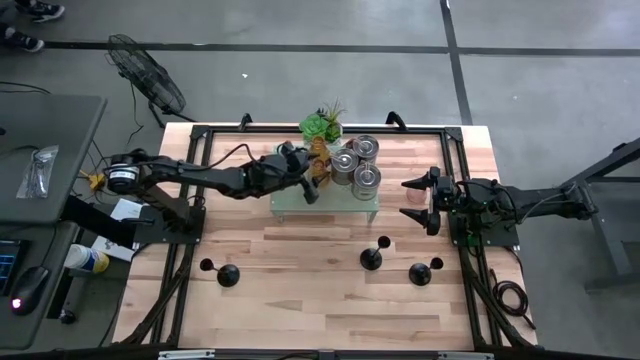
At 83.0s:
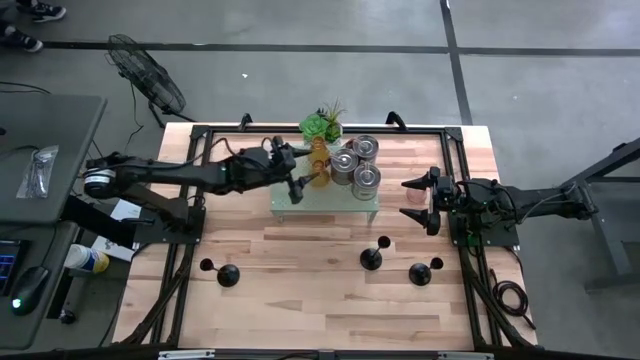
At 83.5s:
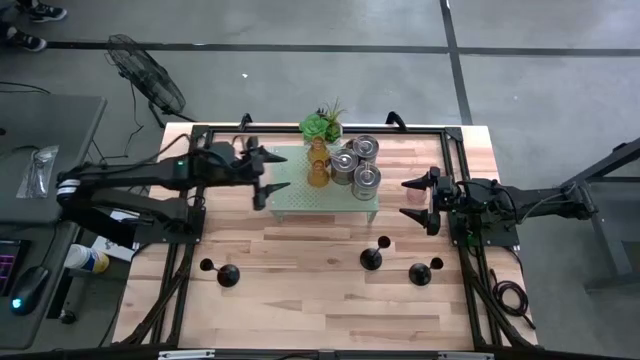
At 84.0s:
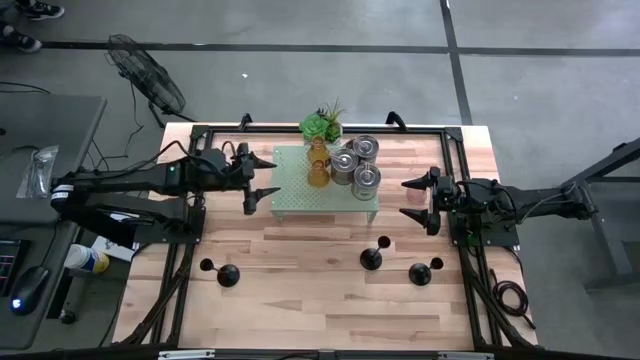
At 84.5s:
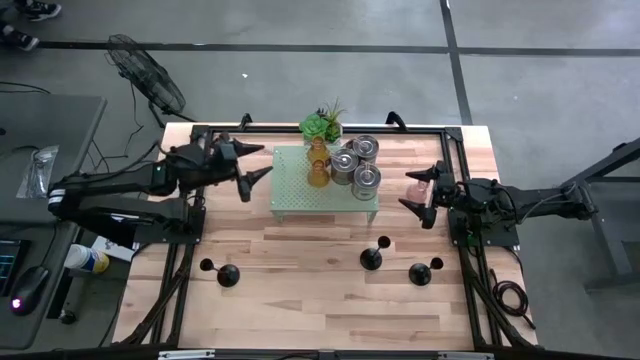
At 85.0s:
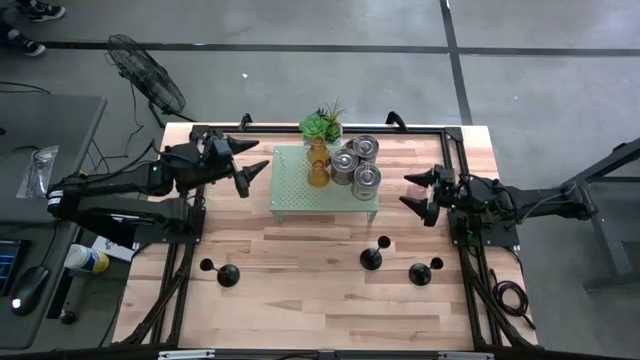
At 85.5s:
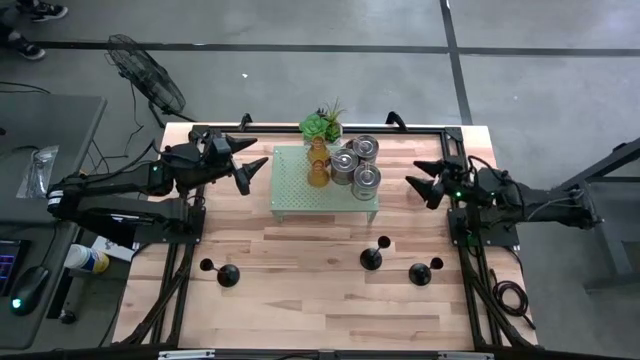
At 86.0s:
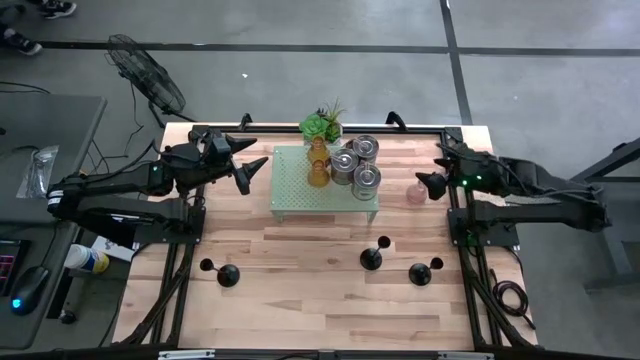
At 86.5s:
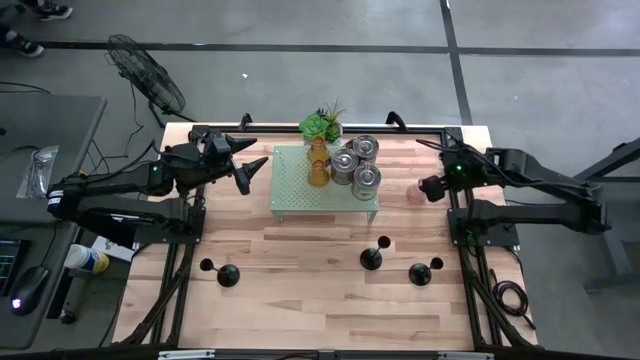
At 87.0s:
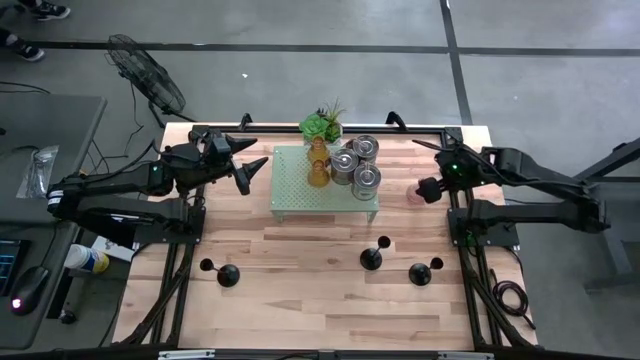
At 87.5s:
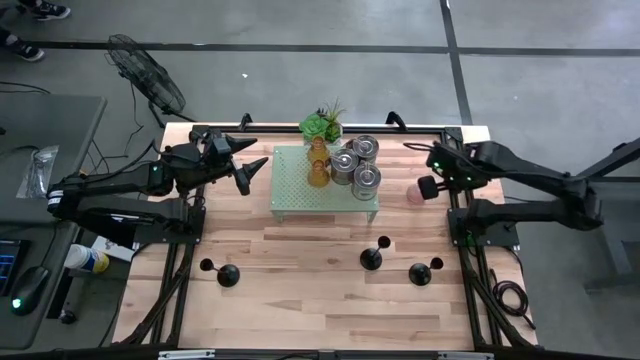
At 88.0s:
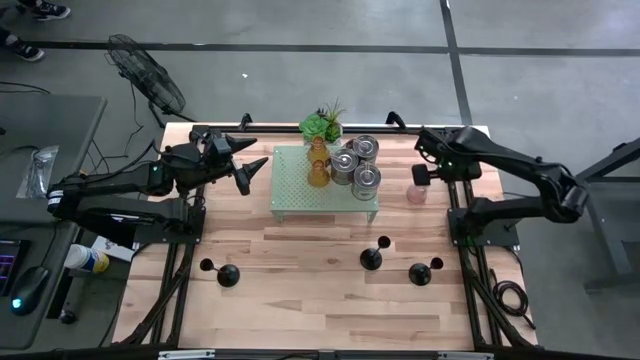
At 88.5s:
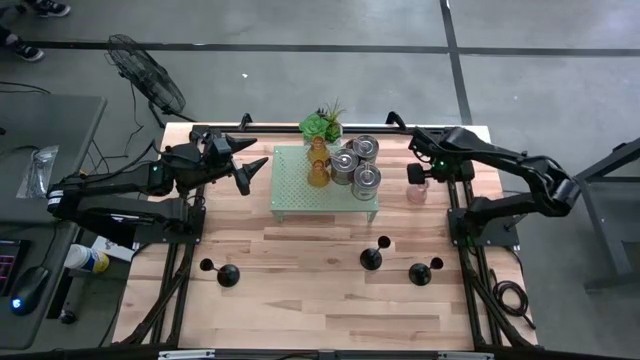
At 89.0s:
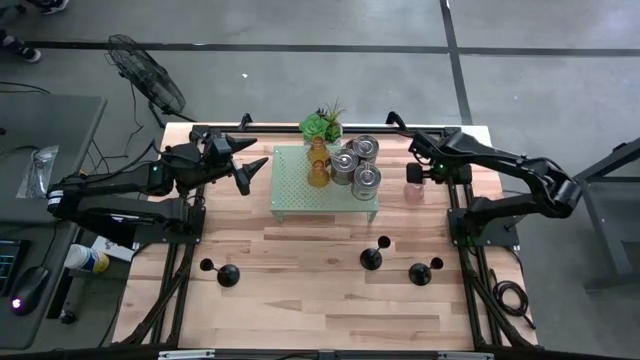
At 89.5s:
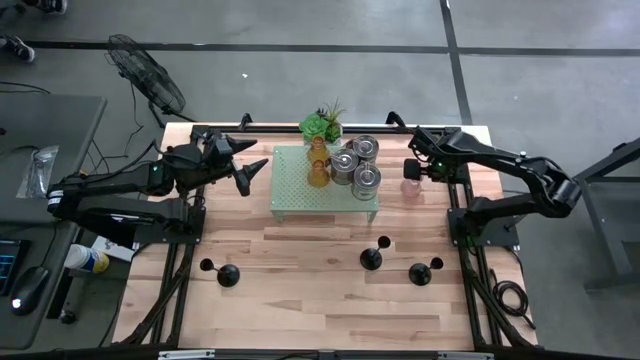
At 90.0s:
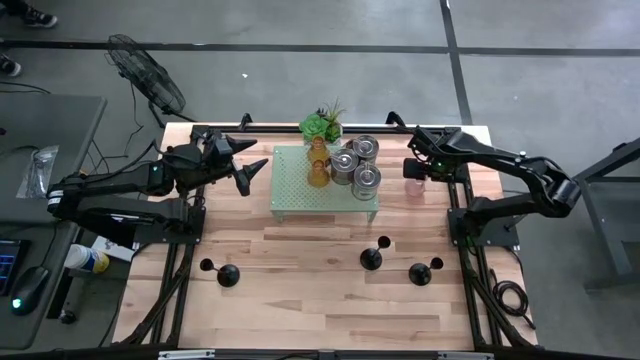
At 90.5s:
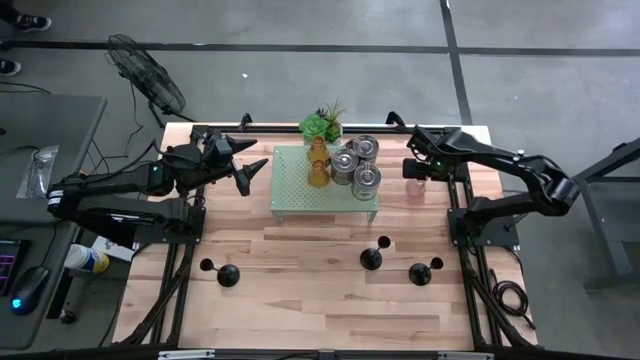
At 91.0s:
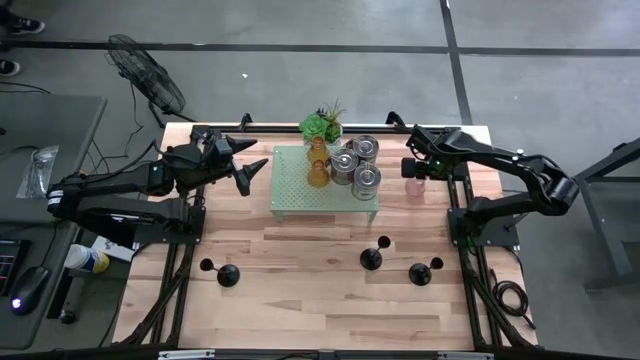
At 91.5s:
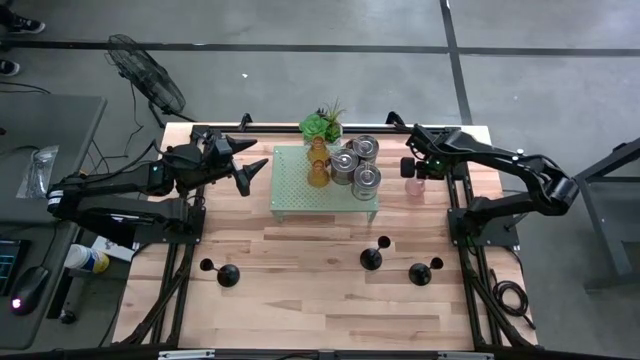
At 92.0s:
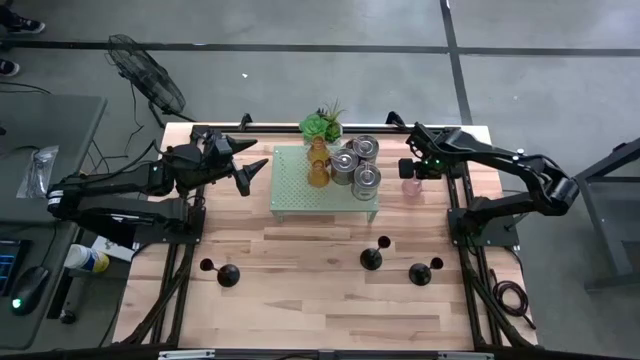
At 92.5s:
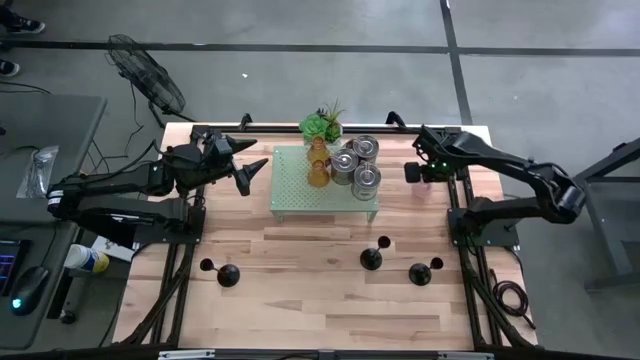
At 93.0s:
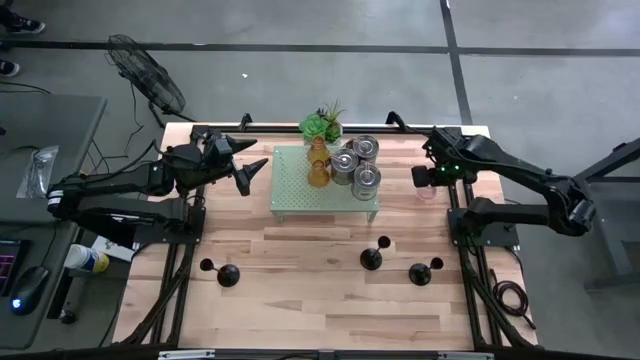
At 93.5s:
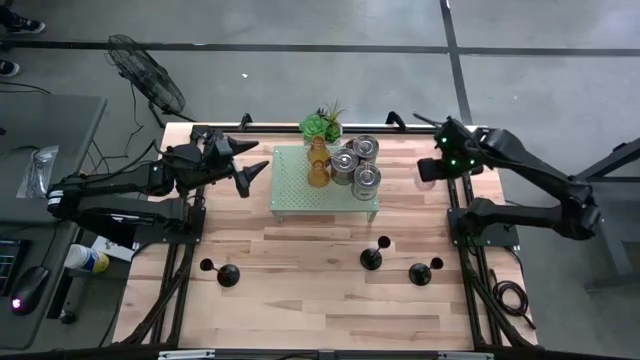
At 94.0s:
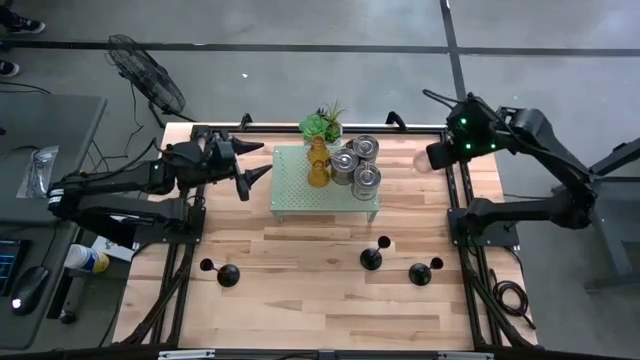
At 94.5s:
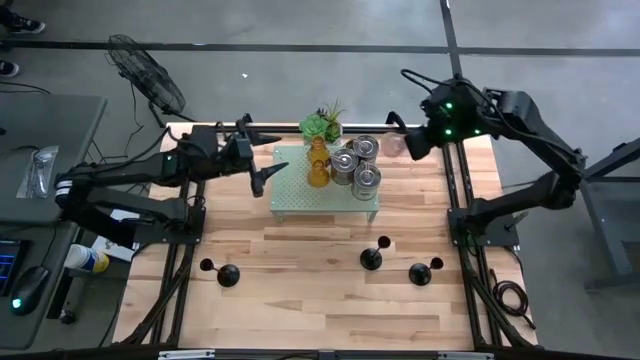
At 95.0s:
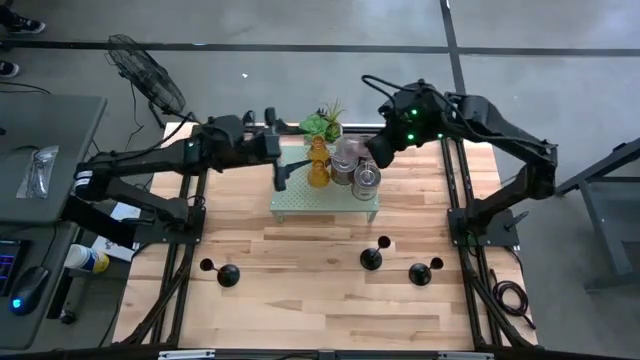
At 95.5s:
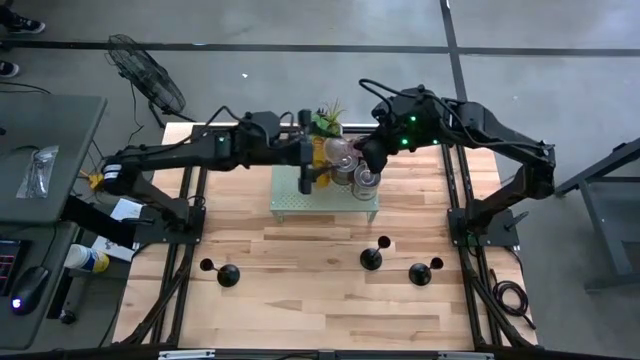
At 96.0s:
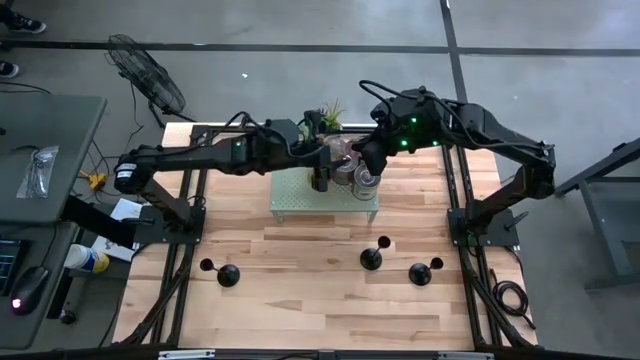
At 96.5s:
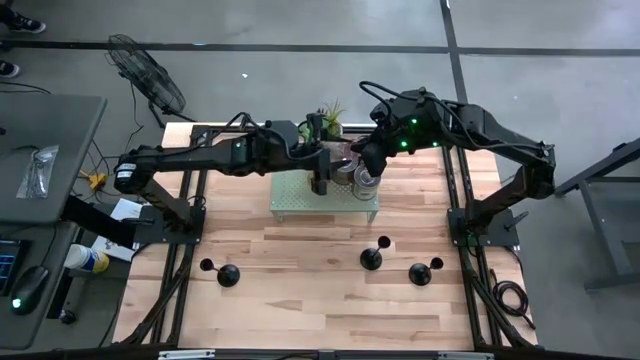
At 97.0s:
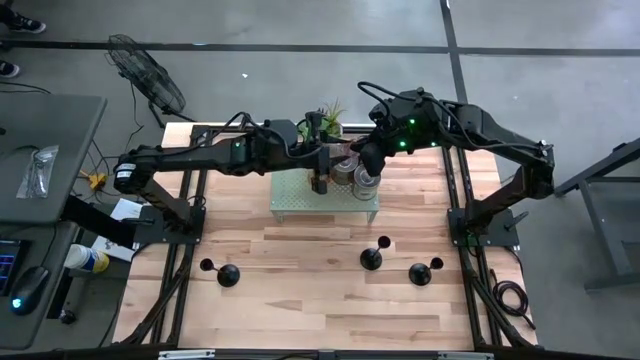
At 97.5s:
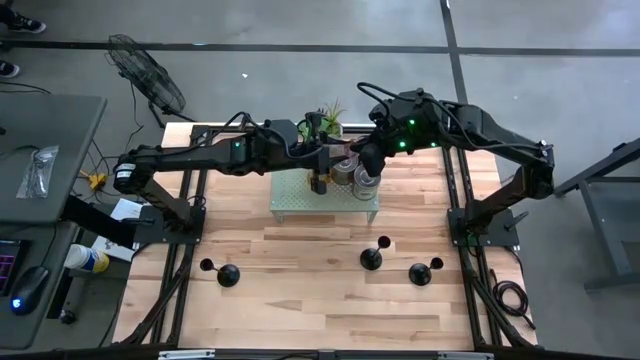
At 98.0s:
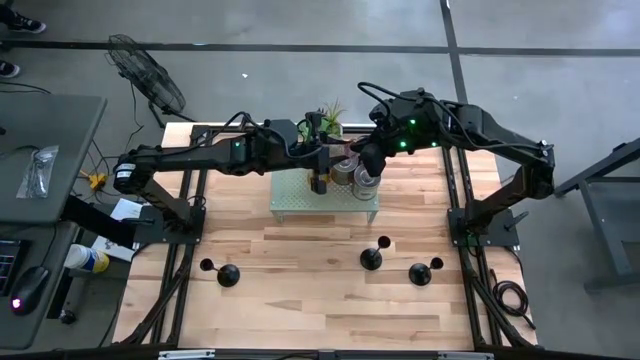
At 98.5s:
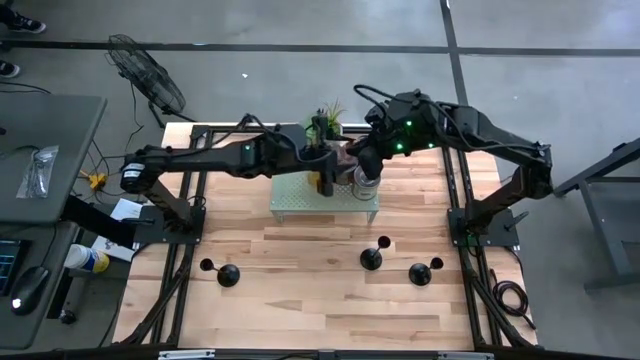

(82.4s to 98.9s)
Task: Pick & Place candle stick holders
Put the pink glass candle holder on the shelf

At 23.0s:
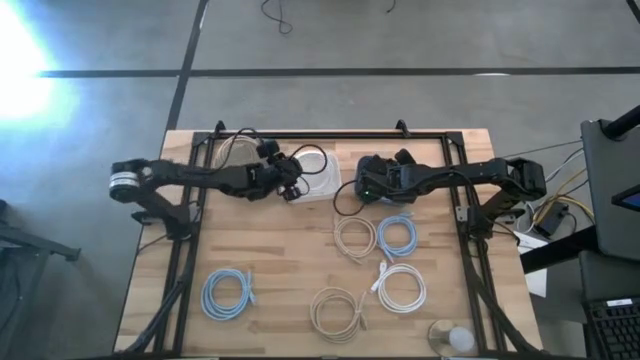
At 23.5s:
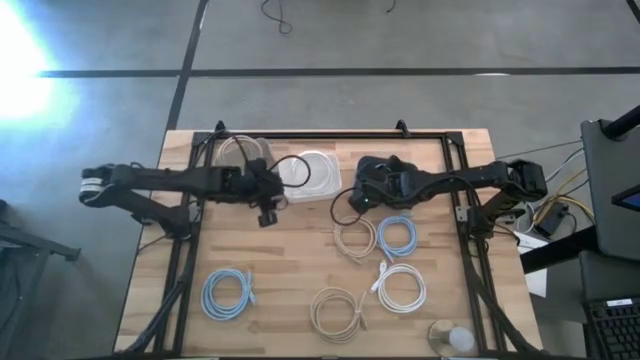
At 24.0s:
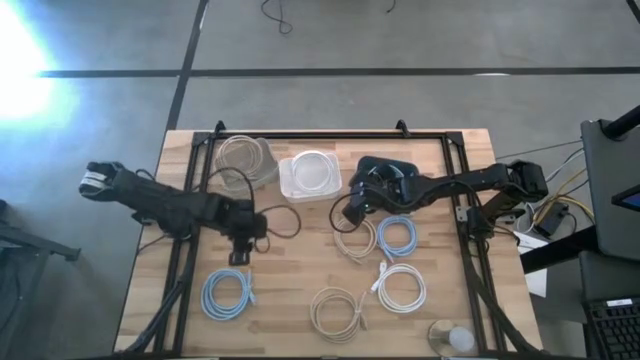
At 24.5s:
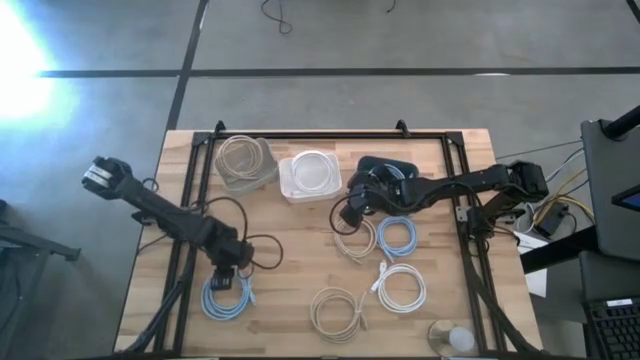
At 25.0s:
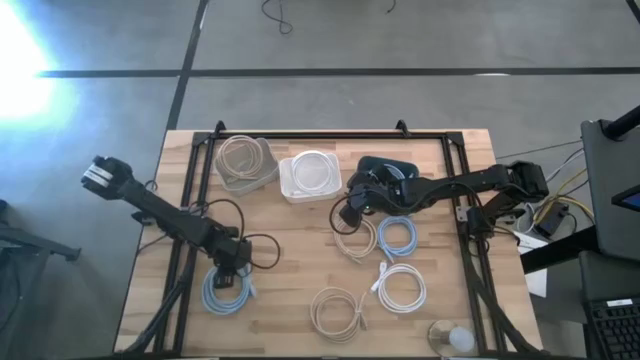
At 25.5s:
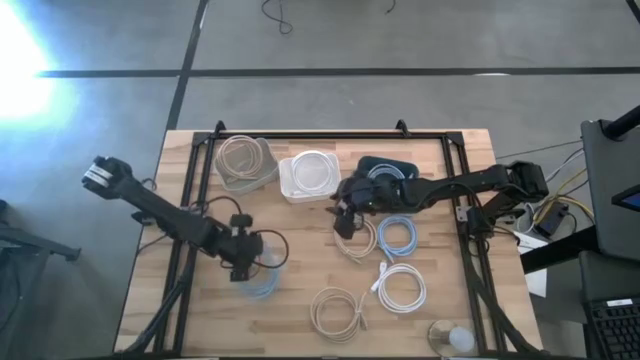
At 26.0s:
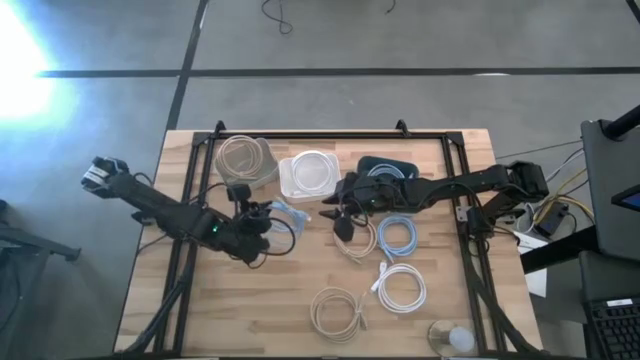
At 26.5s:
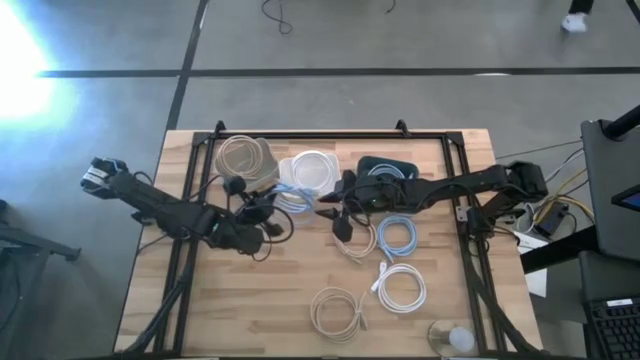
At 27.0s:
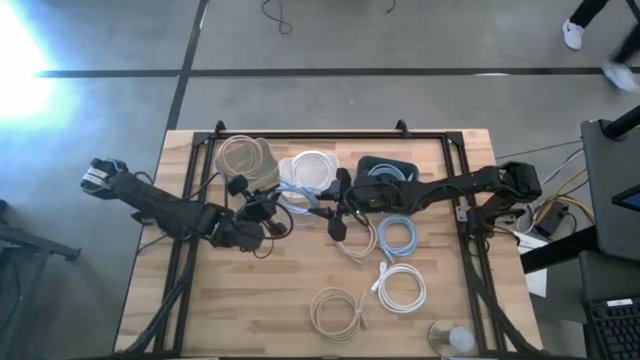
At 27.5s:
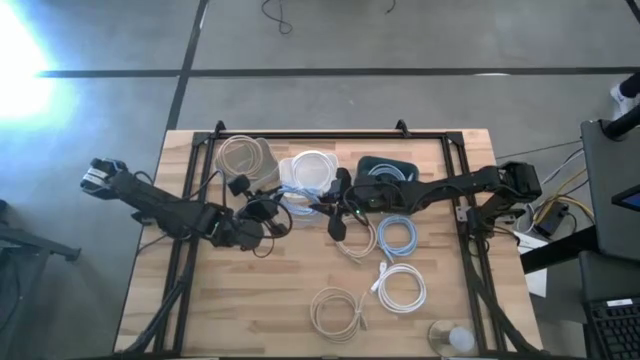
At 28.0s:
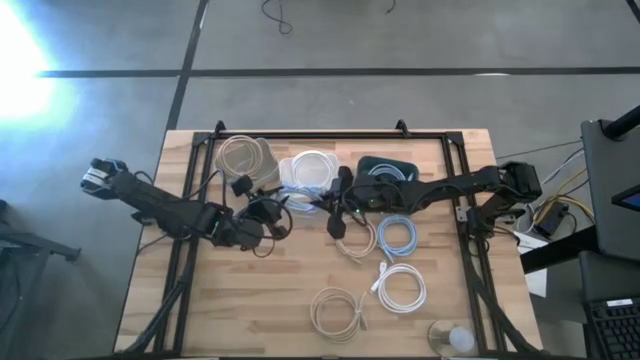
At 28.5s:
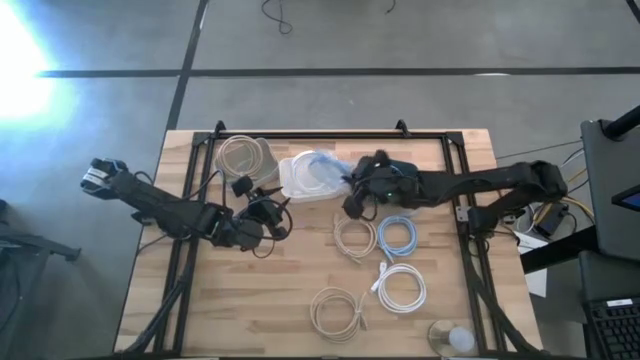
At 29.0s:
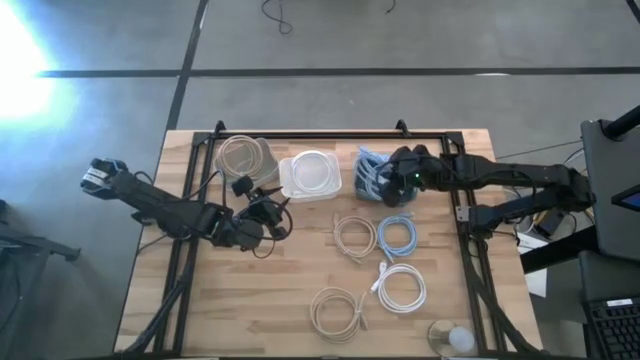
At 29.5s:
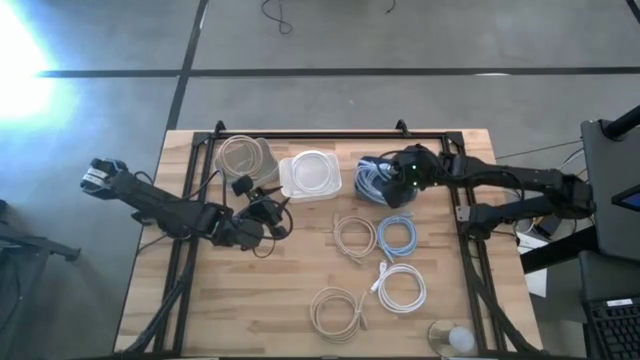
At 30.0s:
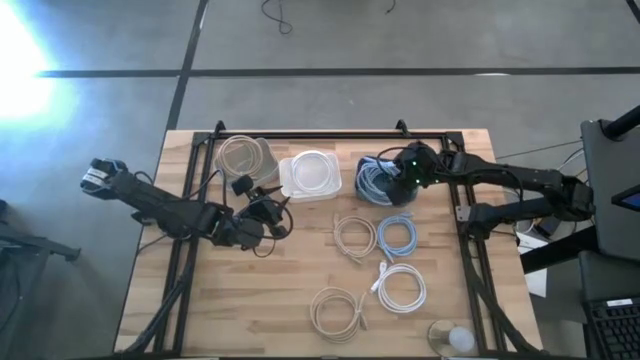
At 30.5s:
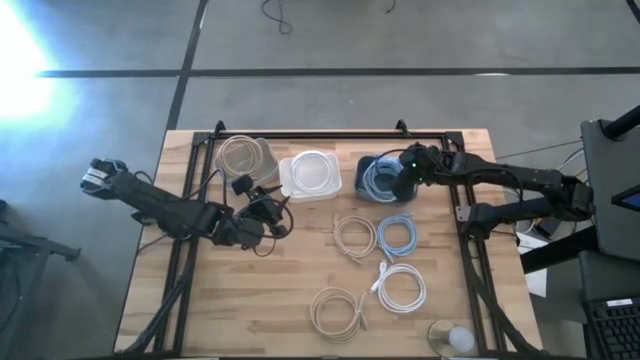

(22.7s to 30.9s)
Task: Sort HDMI cables
Put the left light blue HDMI cable into the blue bin
